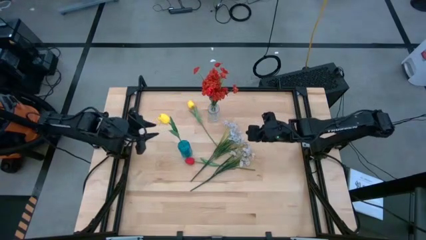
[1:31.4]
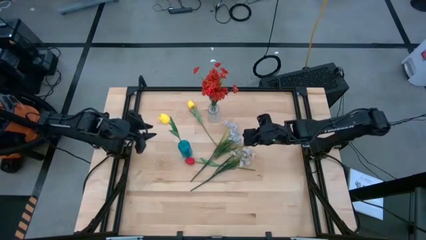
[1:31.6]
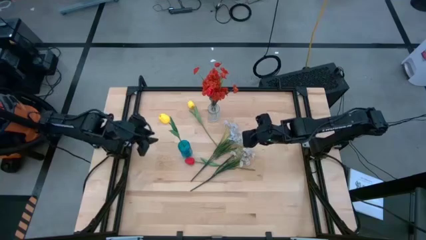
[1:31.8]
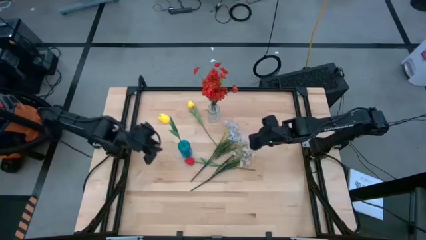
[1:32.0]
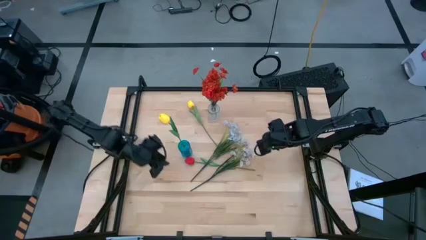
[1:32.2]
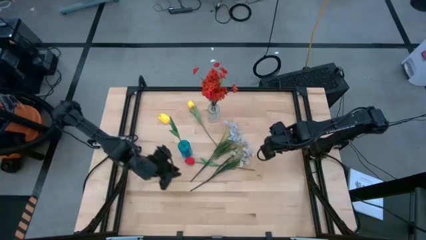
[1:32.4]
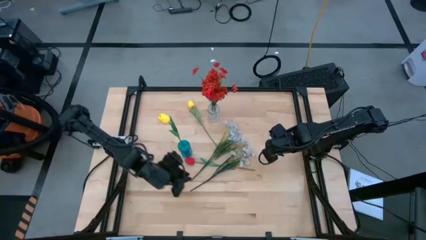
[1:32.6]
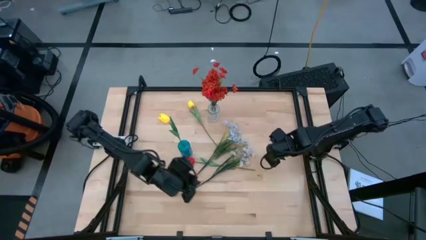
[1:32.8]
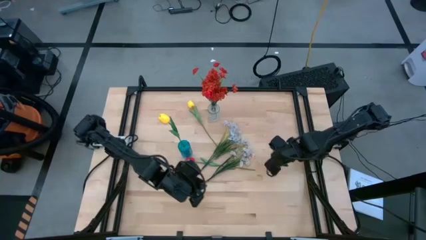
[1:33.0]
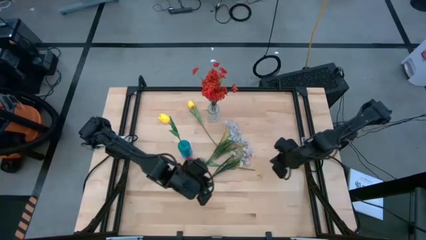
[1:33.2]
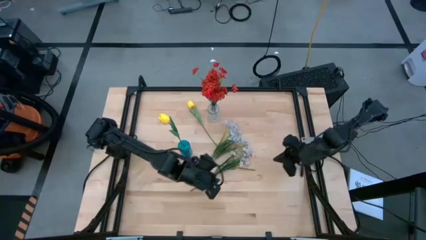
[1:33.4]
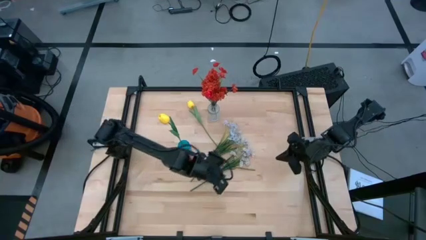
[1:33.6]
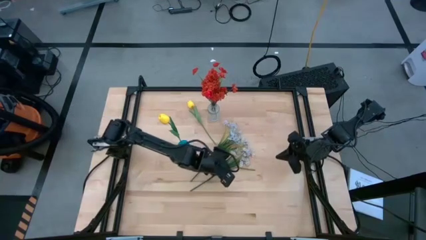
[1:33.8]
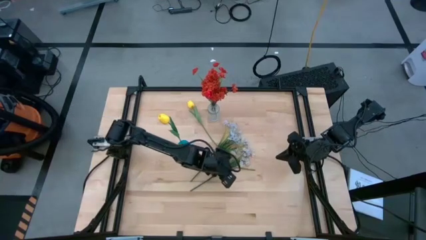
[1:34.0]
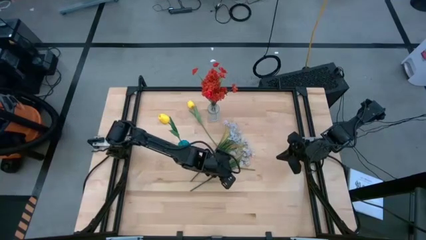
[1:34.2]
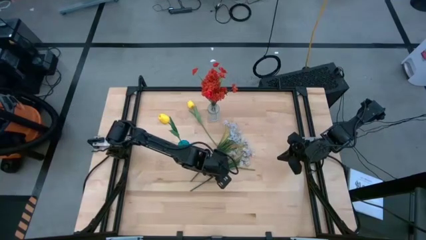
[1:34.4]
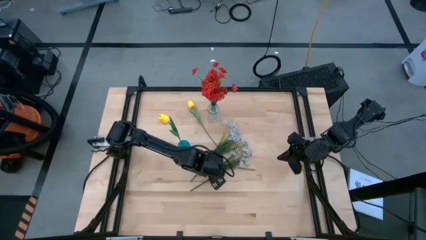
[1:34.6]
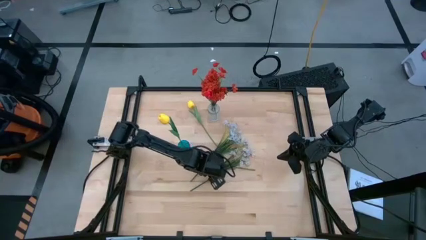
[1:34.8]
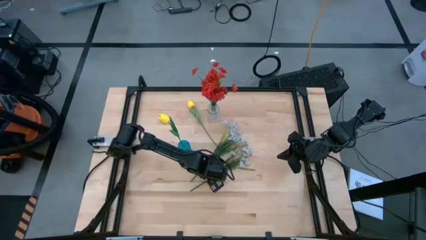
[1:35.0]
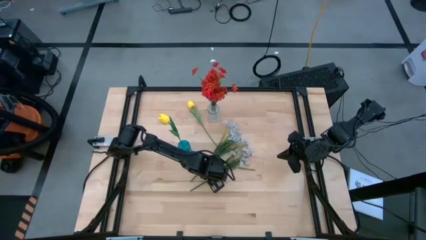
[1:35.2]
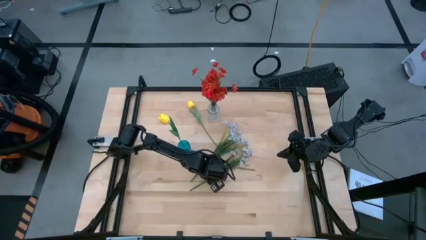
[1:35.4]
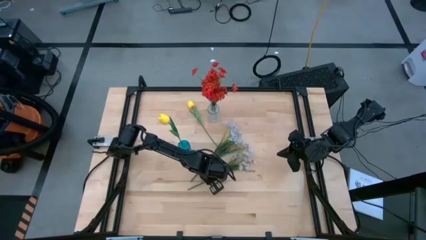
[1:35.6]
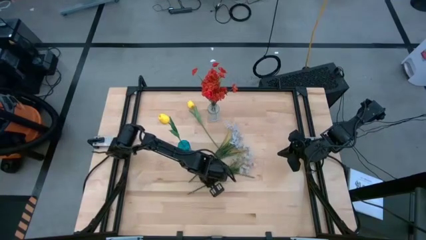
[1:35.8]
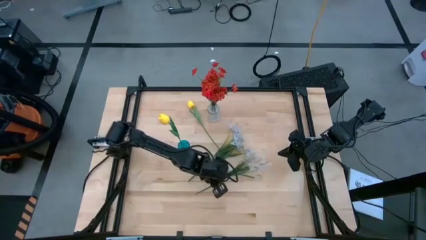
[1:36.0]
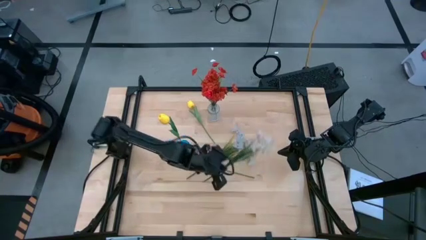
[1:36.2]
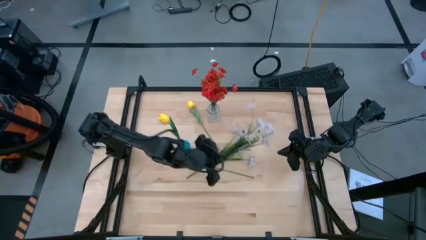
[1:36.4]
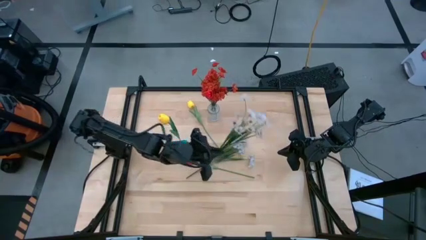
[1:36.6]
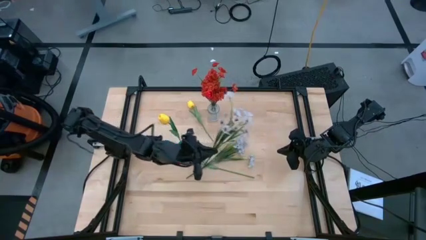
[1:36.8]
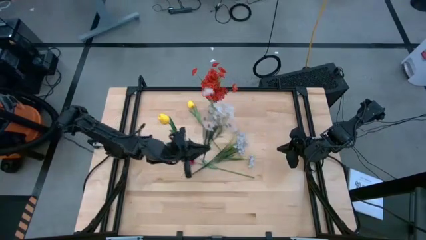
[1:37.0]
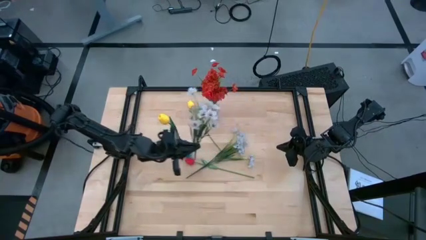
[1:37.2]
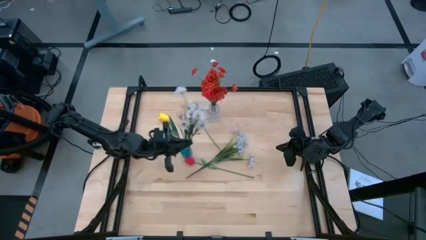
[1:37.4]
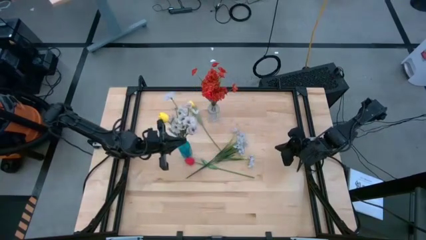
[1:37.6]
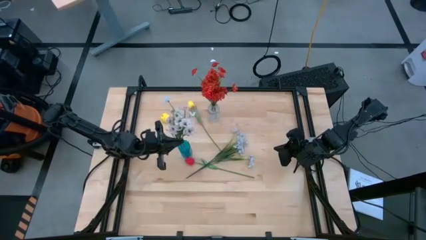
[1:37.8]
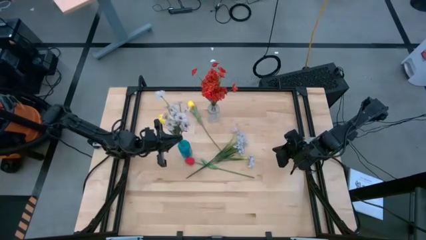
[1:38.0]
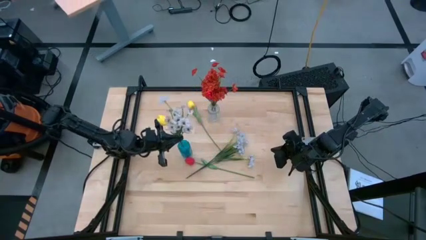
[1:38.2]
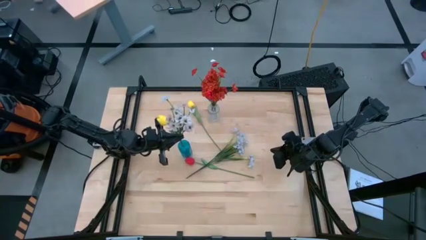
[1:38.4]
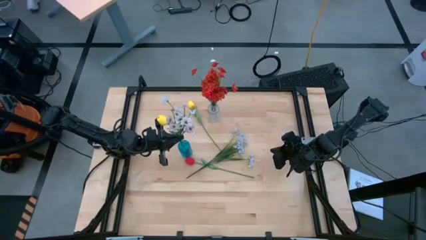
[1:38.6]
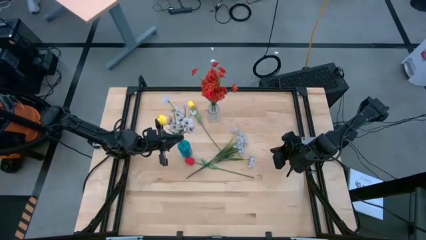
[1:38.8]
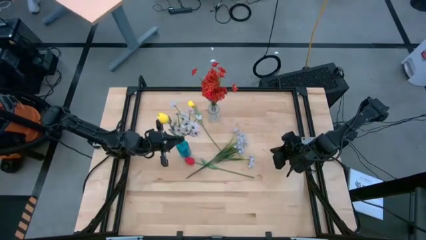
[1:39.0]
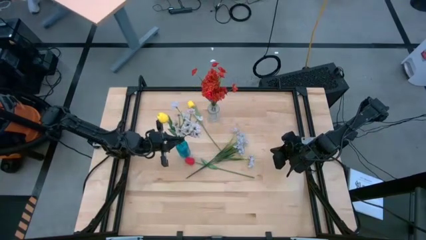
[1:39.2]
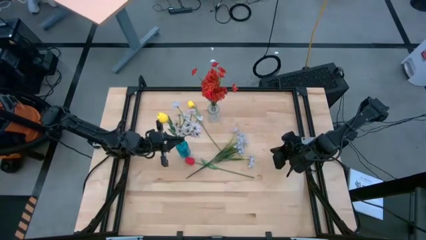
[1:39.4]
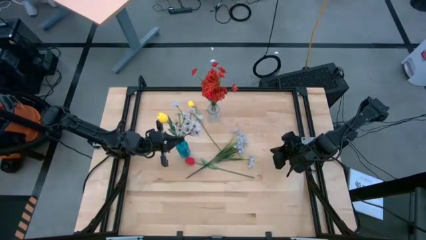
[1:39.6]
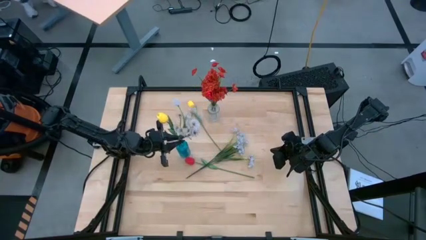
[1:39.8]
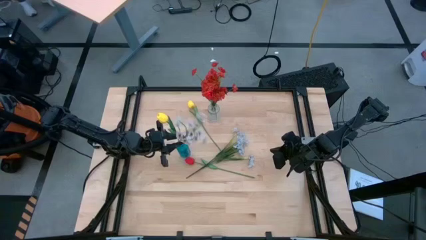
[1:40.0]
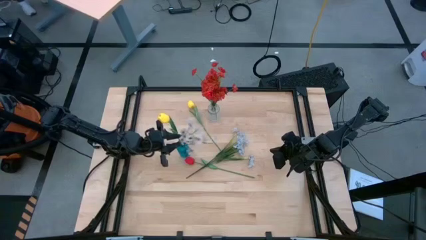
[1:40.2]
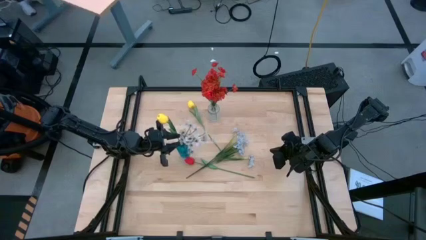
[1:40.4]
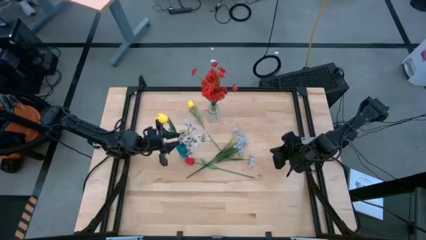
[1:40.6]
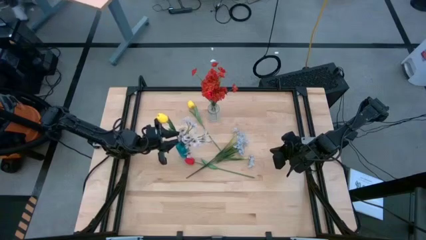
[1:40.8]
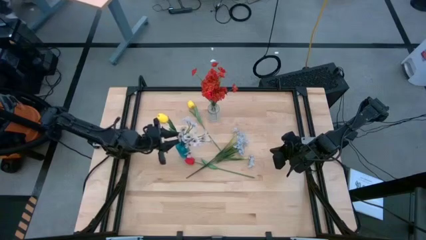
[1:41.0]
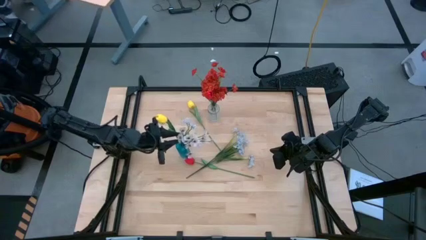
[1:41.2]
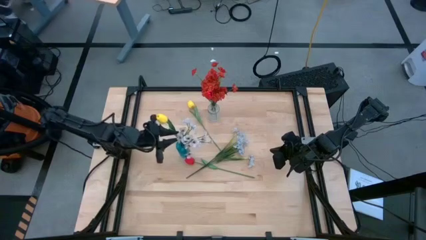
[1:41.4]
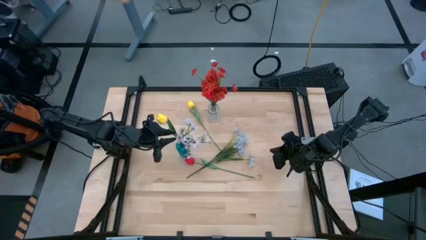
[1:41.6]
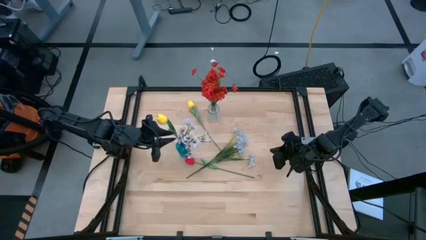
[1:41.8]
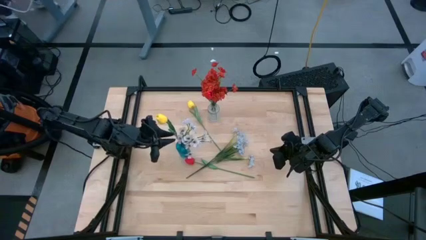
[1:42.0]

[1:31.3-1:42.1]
Task: Sort flowers into vase by color
Put the bottom white flowers into the blue vase

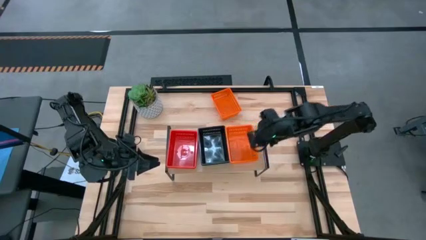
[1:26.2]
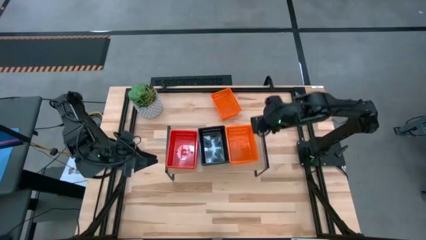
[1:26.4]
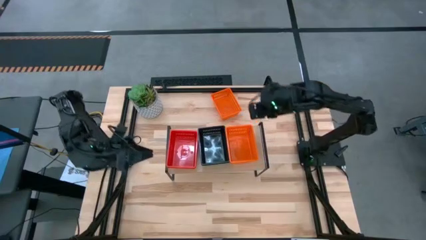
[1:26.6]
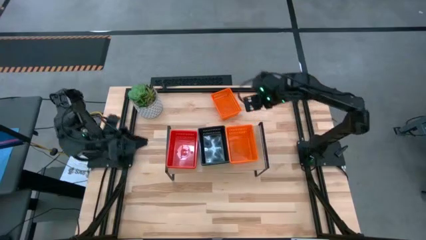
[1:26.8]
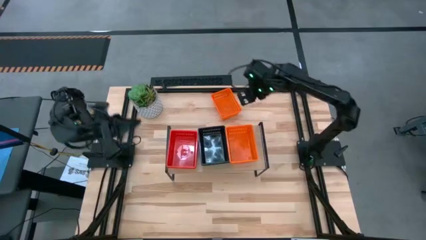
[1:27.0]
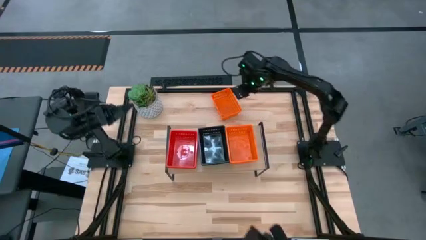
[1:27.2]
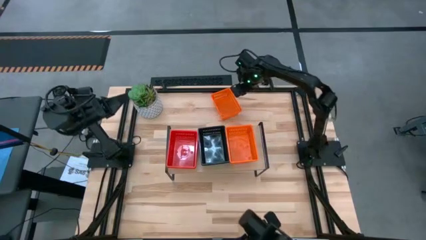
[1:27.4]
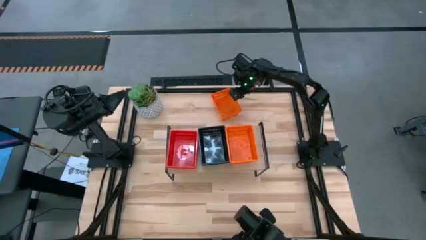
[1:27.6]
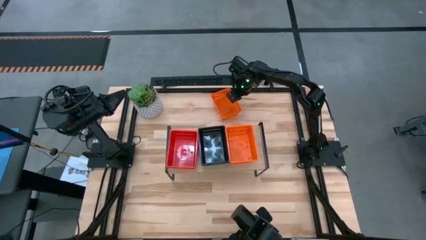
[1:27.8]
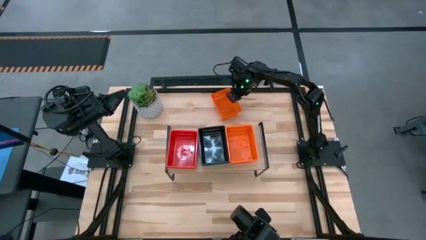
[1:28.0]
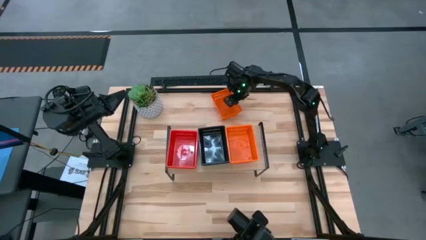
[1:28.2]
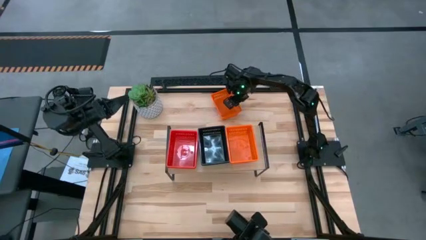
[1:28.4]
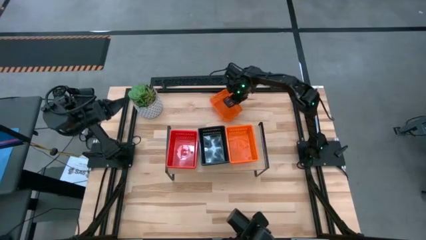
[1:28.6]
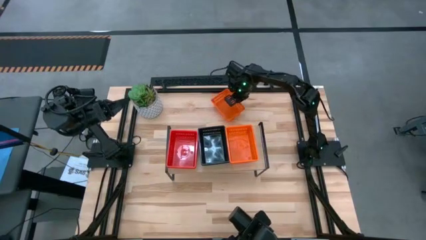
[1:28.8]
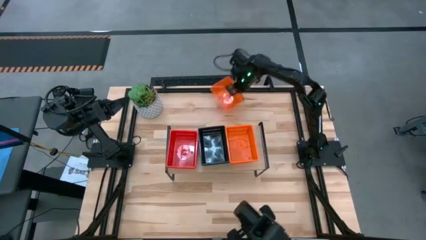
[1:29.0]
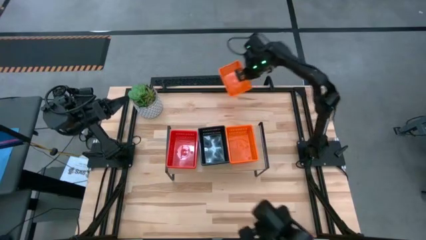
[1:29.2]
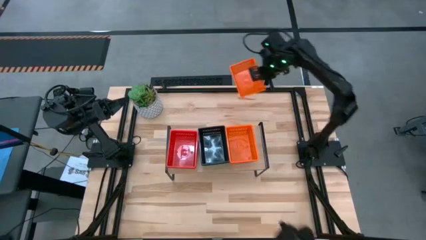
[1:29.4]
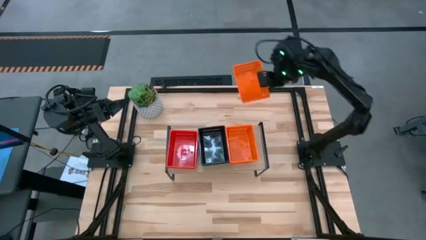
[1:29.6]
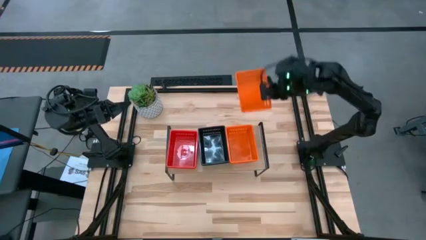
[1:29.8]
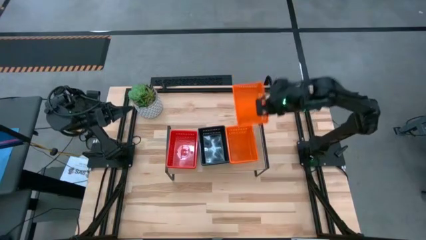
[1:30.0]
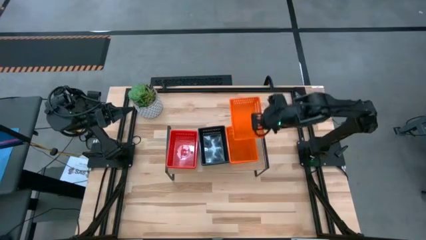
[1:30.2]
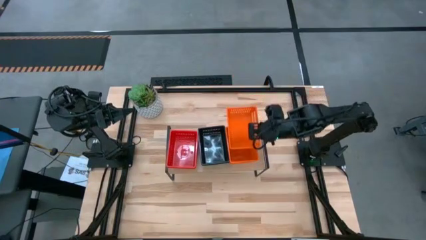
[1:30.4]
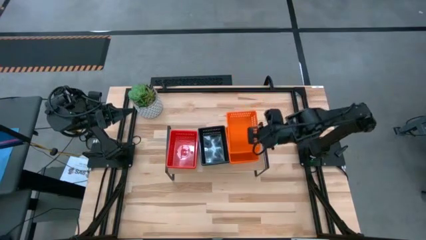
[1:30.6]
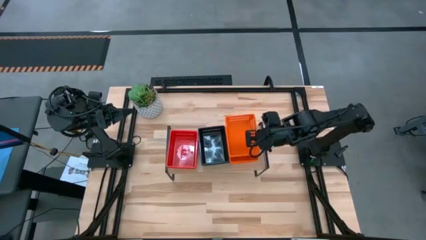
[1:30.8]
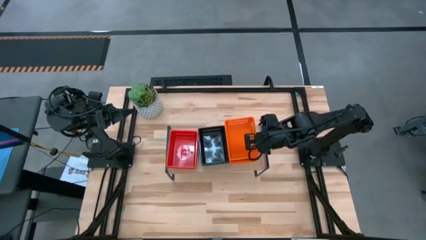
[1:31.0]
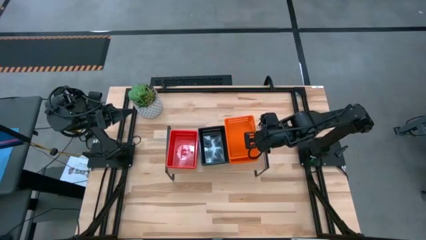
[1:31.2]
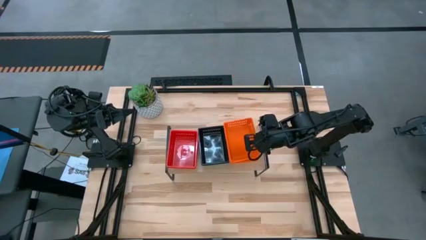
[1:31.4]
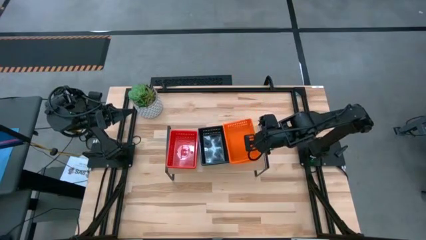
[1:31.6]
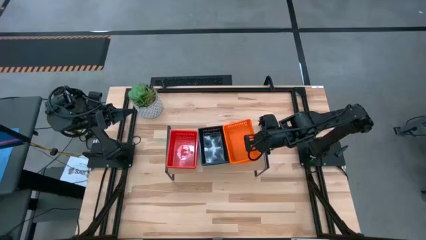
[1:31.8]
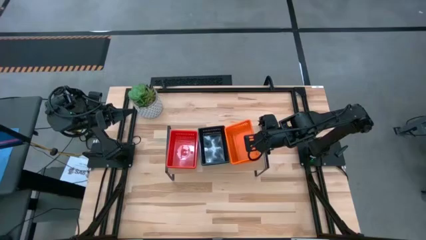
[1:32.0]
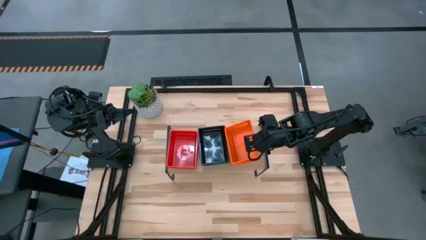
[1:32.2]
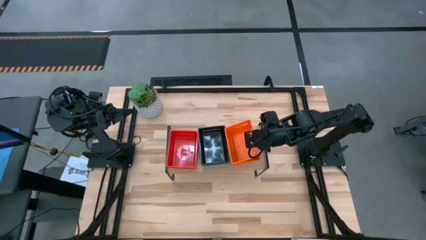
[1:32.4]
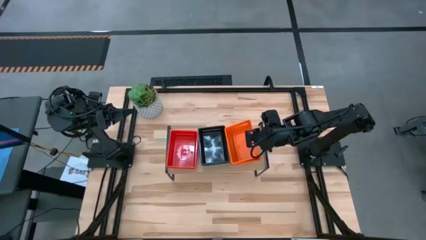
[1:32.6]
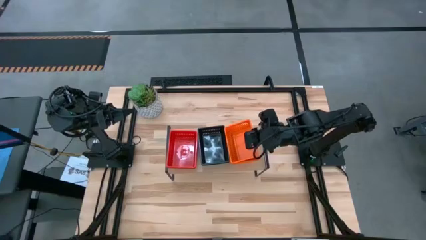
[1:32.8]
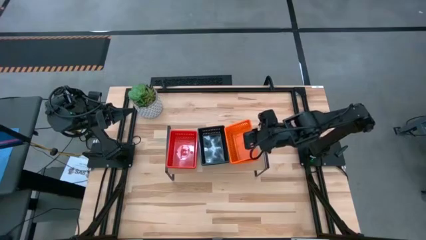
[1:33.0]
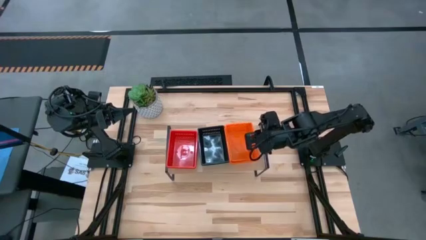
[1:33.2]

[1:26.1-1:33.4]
Task: Stack baskets on shelf by color
Stack the orange bin on top of the other orange bins on the shelf
